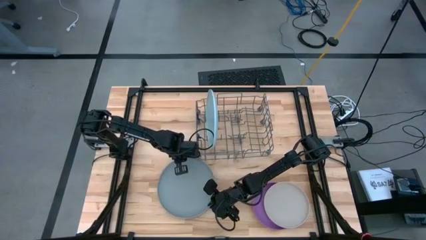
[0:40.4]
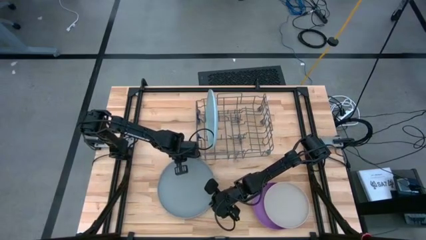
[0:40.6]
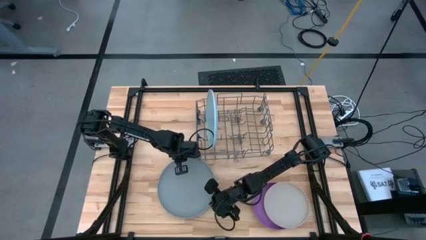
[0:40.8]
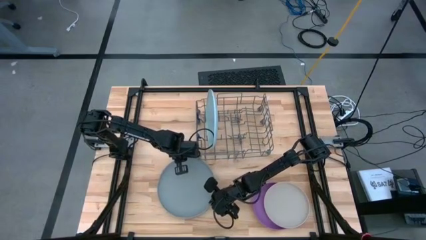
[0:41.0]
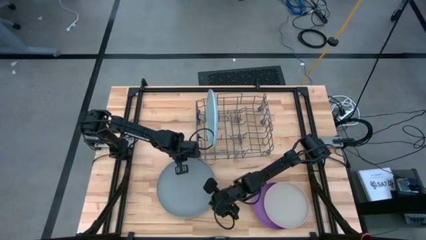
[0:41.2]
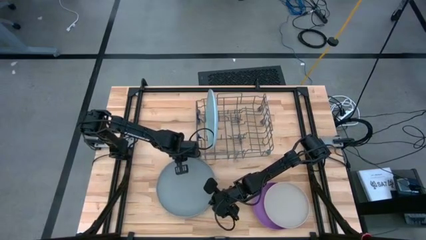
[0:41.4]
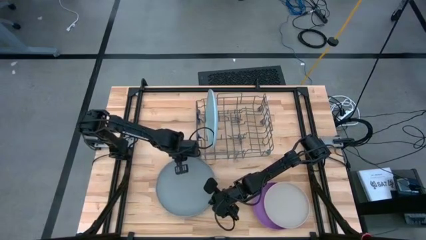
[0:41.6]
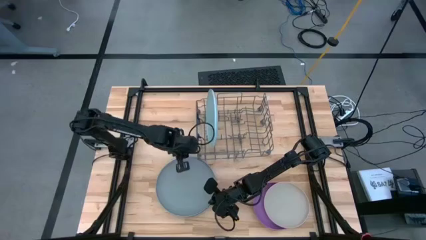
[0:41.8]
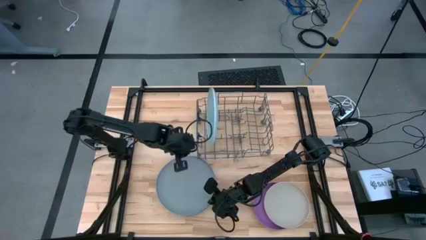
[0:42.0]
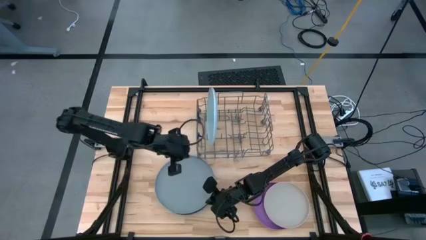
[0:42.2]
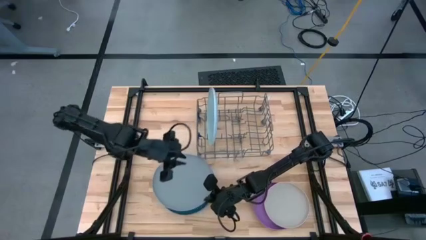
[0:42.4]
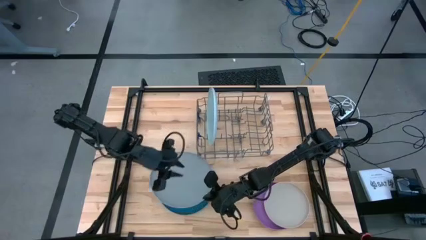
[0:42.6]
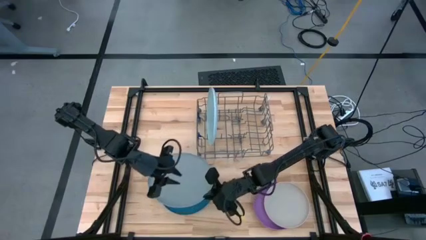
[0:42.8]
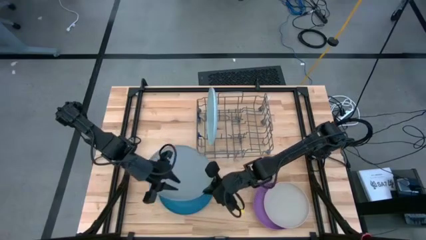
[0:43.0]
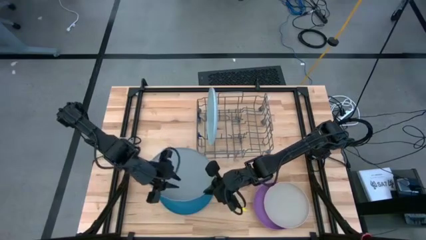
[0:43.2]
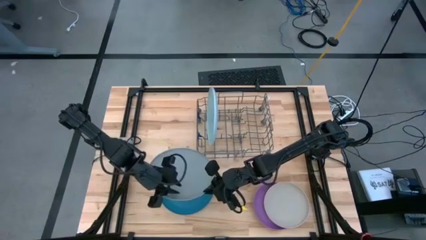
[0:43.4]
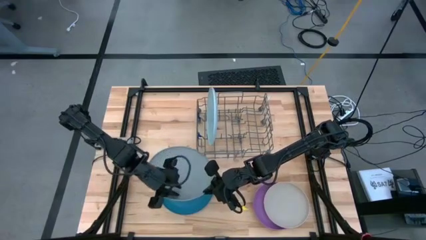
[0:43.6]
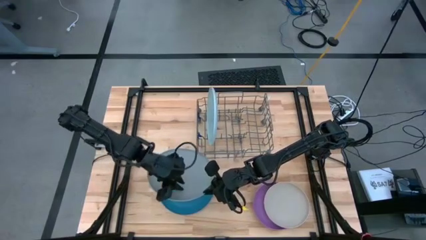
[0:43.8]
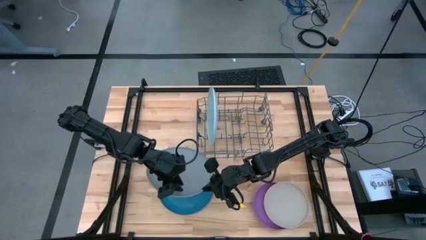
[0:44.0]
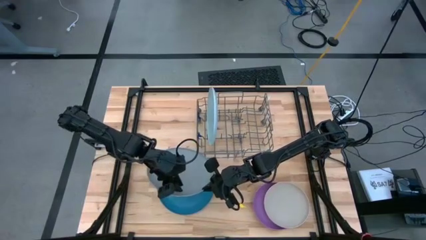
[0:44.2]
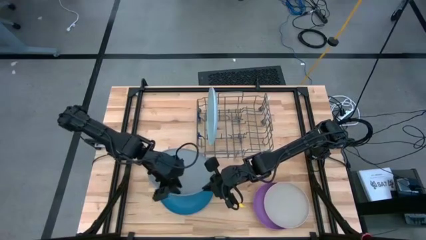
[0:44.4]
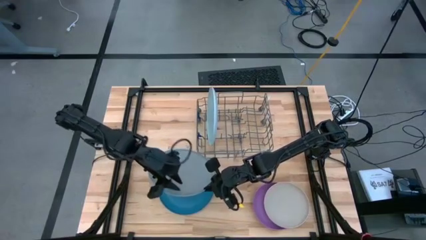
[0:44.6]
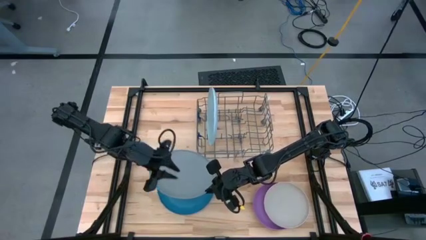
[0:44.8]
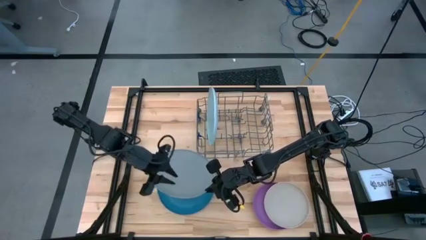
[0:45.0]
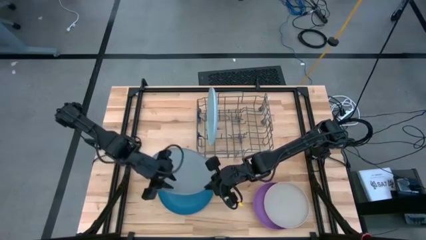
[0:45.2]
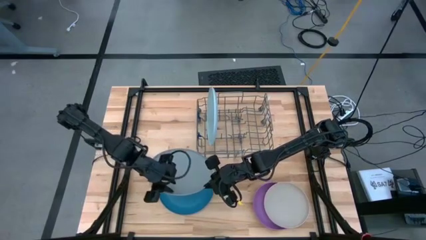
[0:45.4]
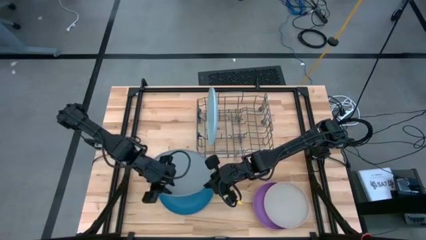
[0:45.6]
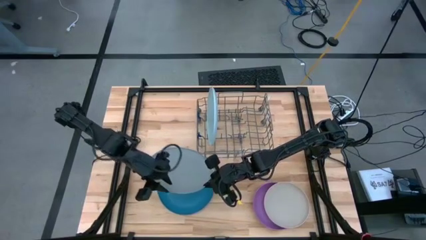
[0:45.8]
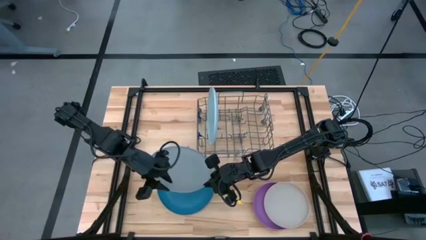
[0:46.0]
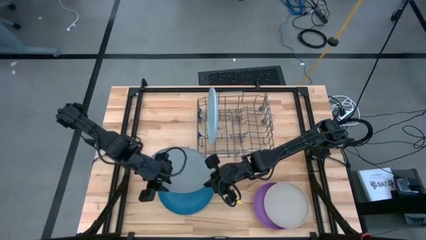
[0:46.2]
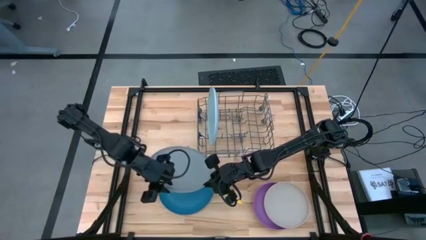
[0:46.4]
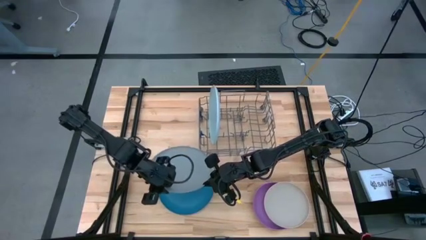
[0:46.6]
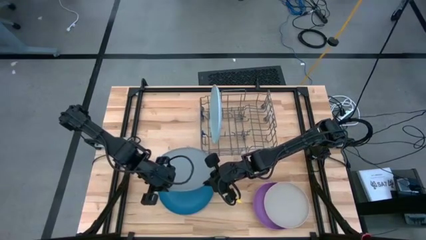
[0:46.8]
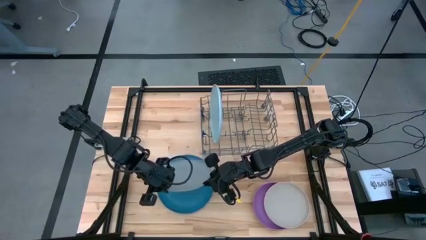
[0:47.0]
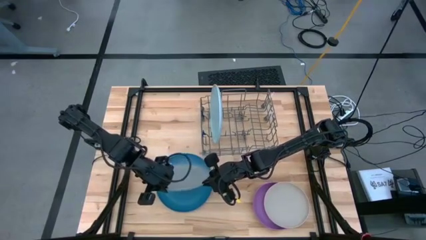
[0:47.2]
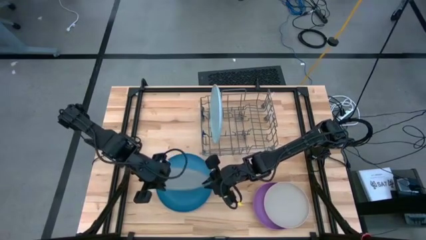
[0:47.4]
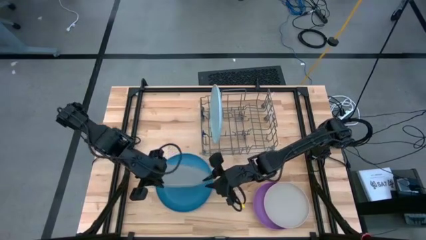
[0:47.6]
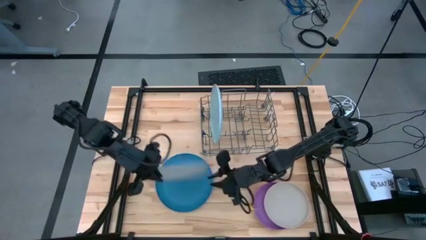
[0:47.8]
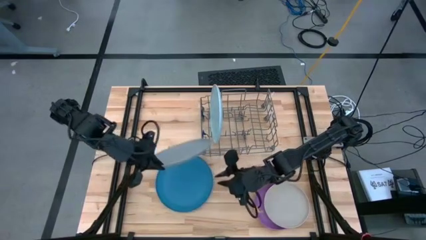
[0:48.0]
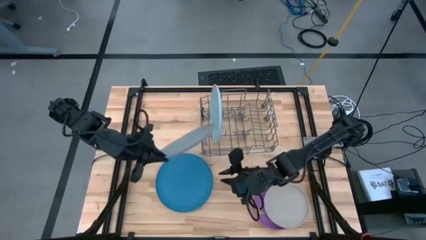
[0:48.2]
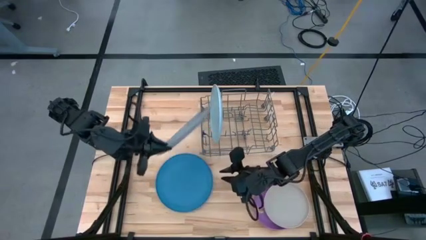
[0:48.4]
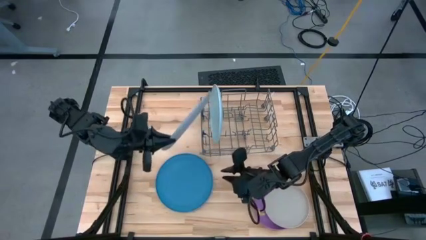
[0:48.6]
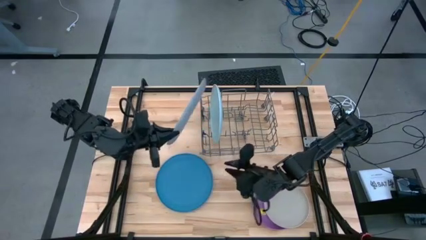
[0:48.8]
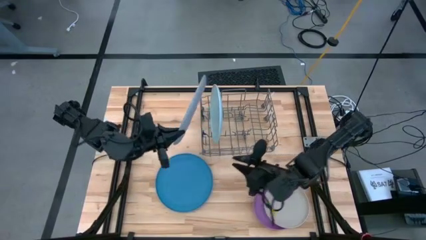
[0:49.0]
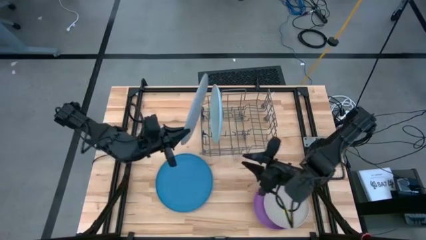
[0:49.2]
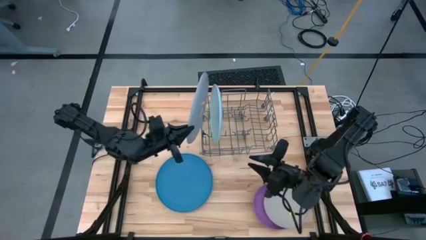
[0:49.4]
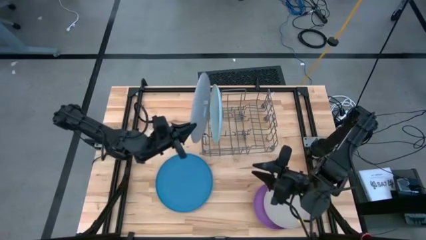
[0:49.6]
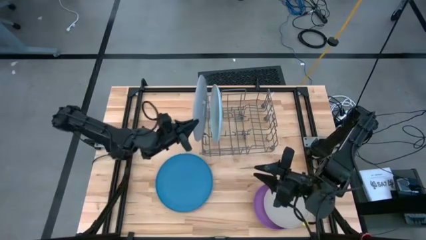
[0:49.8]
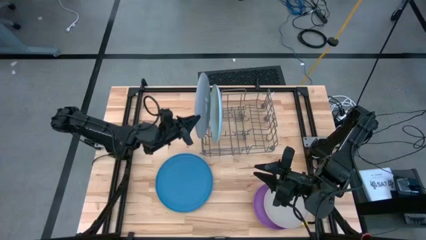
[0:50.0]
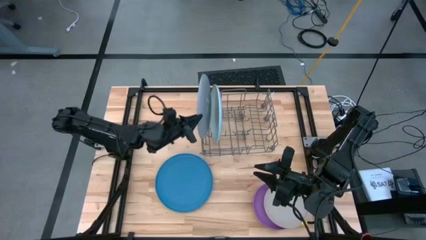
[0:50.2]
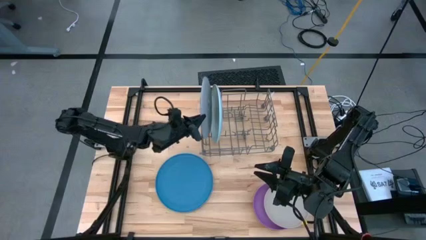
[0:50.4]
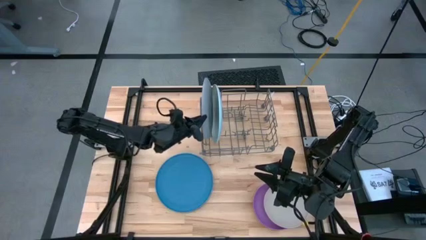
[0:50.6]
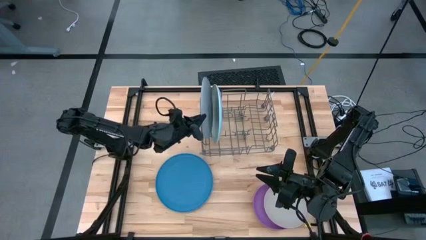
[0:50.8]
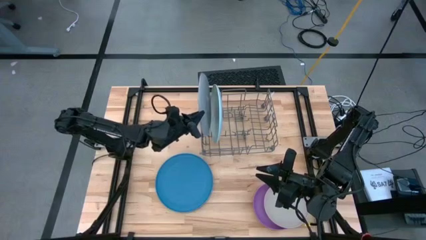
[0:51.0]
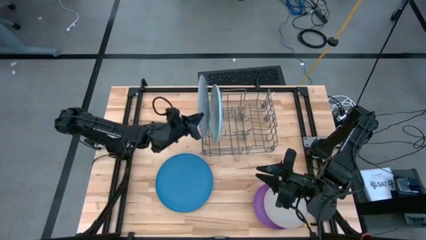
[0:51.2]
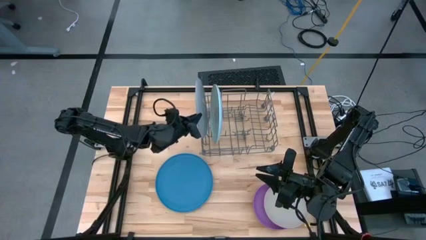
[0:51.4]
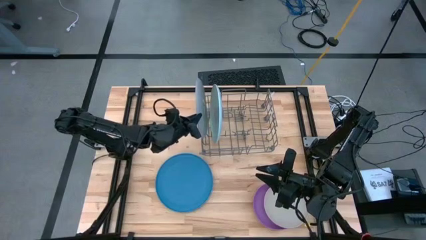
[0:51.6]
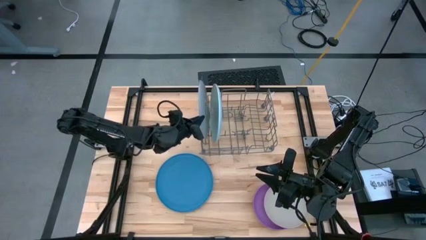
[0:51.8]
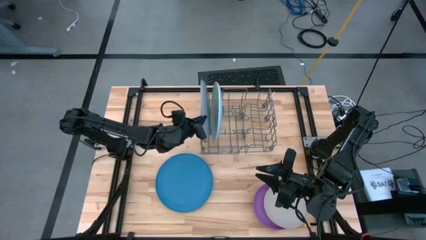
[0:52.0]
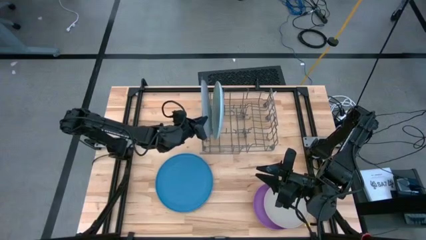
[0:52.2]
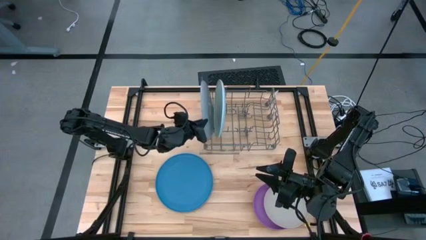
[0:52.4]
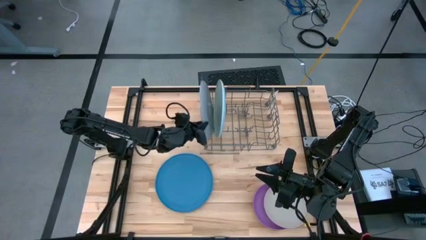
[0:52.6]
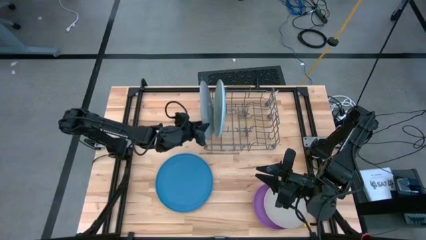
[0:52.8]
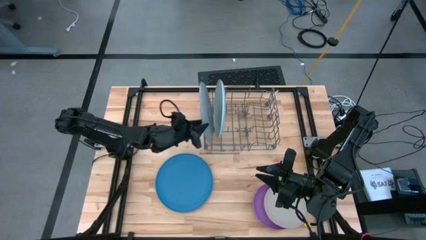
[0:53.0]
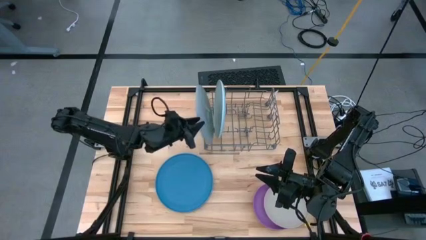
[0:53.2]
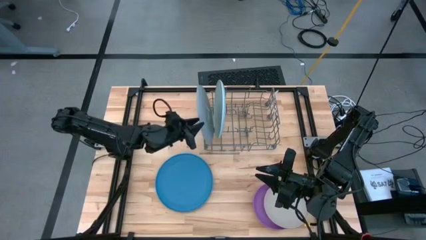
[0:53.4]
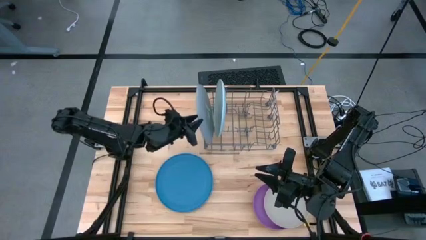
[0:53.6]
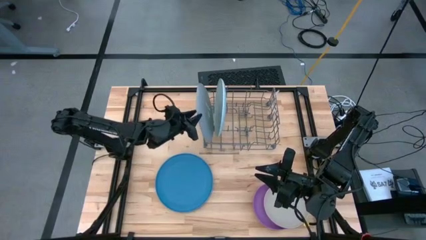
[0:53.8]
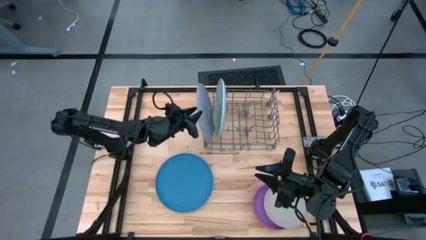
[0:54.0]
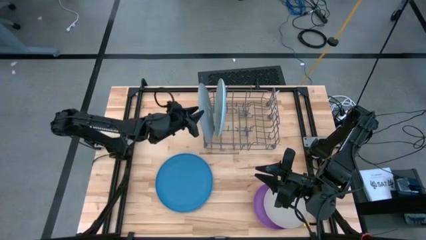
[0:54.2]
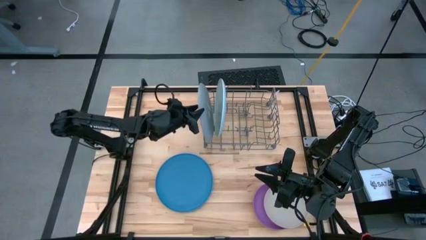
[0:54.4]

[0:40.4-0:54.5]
Task: Sort dishes
Put the gray plate into the dish rack
